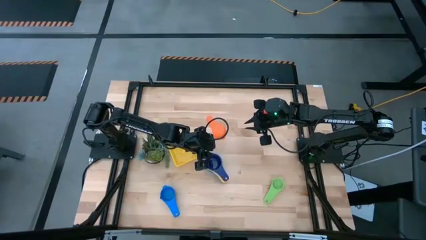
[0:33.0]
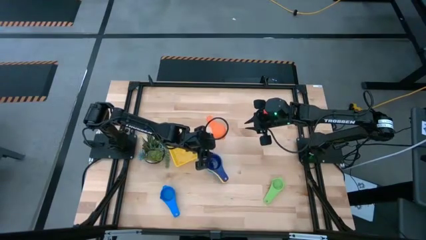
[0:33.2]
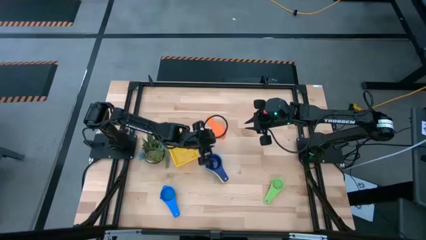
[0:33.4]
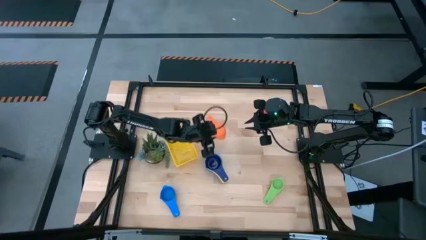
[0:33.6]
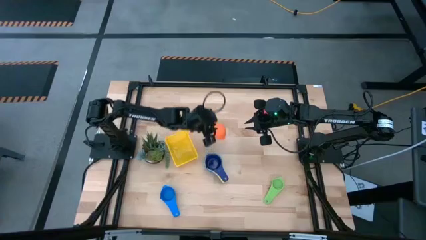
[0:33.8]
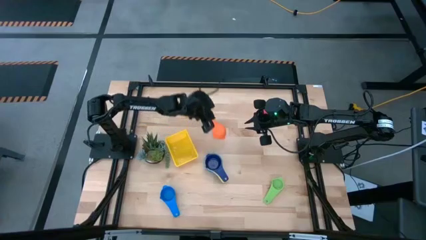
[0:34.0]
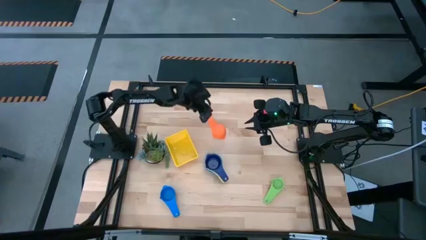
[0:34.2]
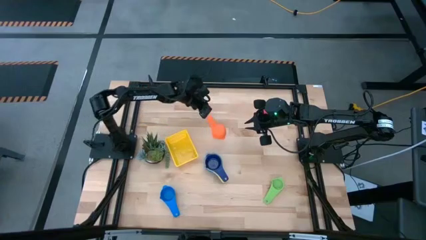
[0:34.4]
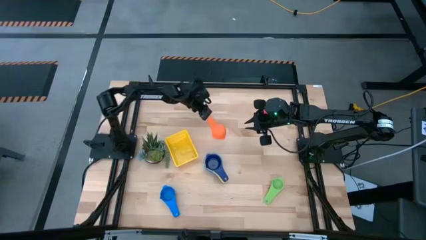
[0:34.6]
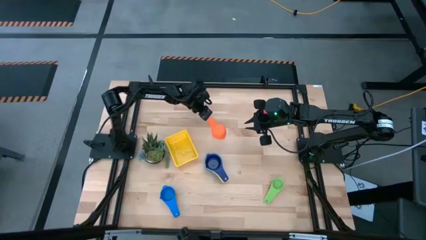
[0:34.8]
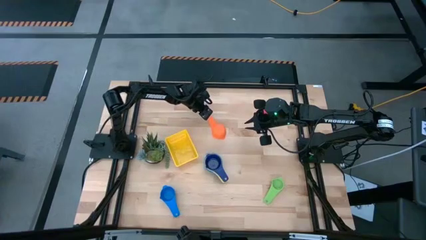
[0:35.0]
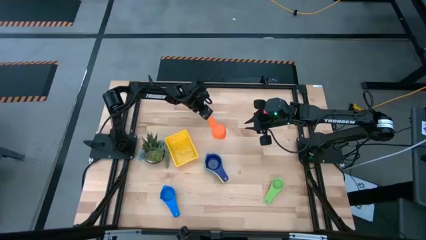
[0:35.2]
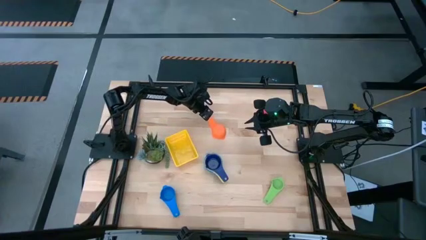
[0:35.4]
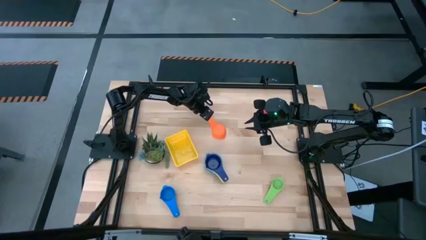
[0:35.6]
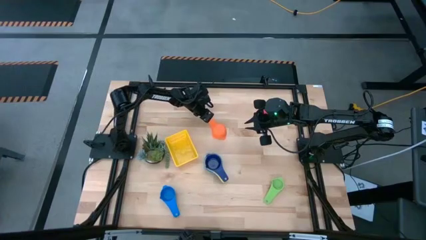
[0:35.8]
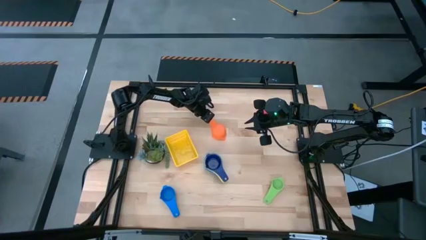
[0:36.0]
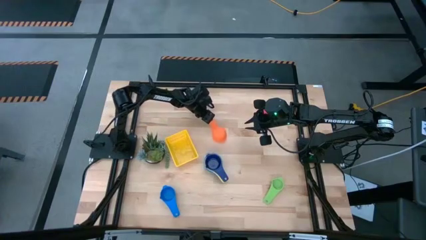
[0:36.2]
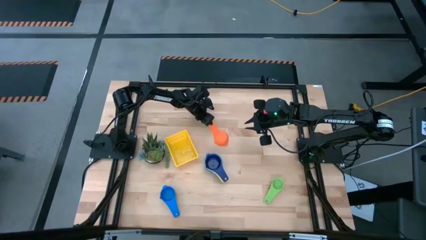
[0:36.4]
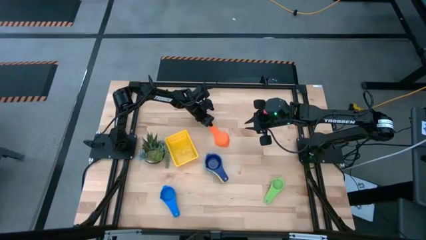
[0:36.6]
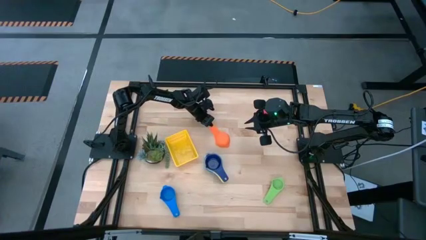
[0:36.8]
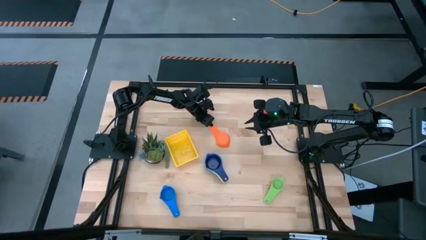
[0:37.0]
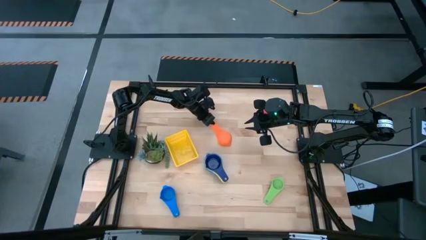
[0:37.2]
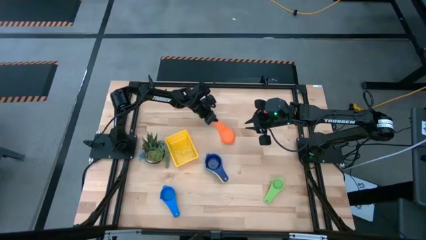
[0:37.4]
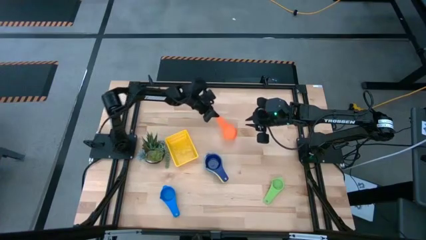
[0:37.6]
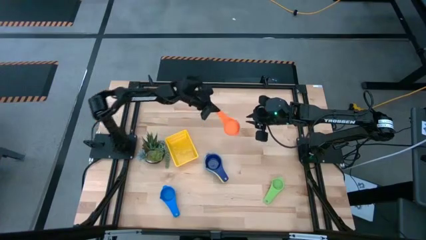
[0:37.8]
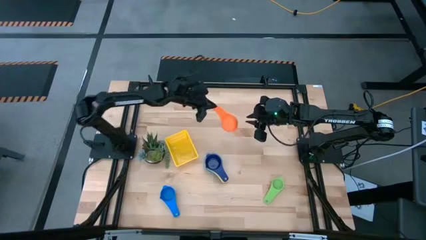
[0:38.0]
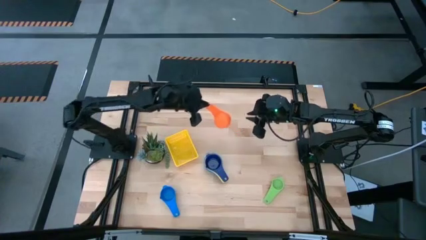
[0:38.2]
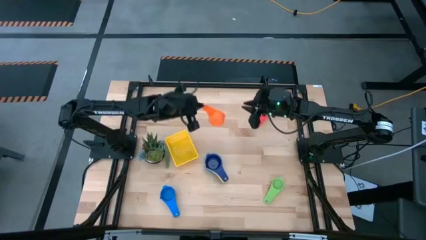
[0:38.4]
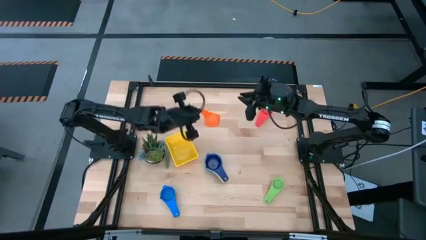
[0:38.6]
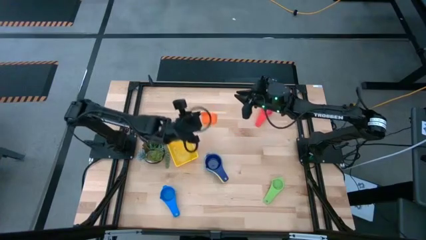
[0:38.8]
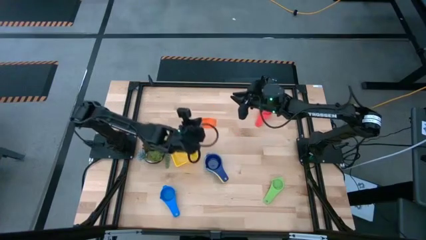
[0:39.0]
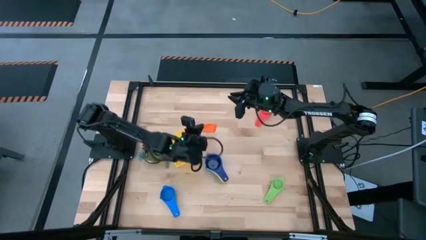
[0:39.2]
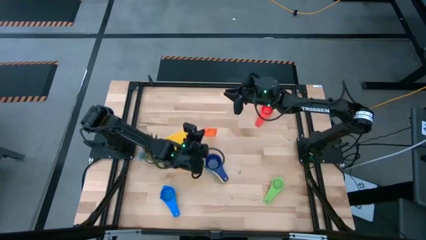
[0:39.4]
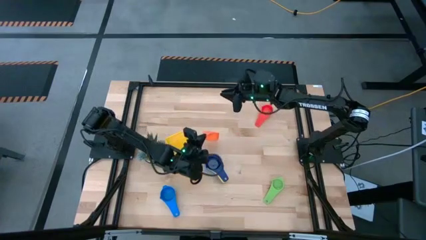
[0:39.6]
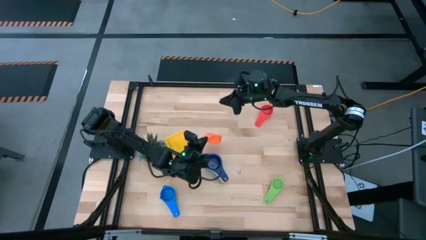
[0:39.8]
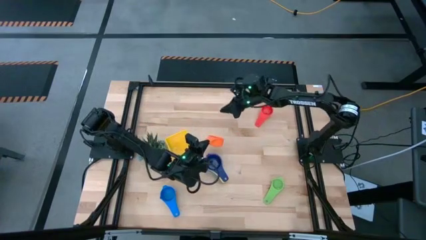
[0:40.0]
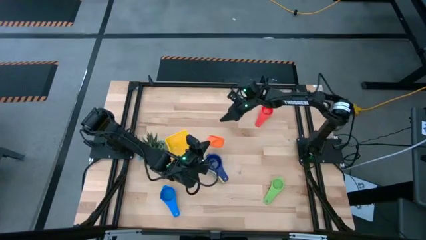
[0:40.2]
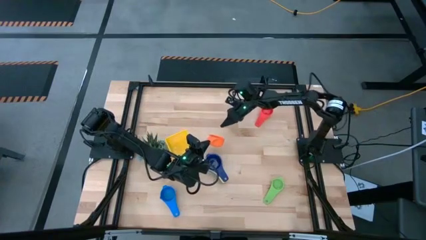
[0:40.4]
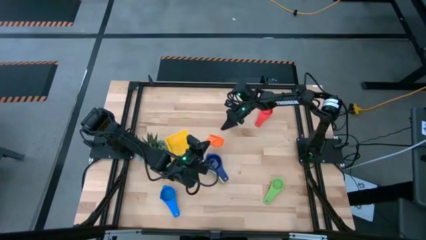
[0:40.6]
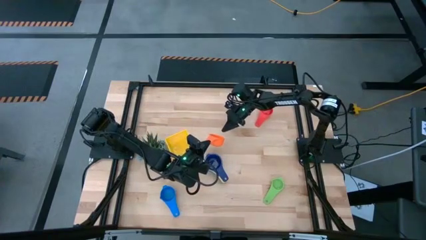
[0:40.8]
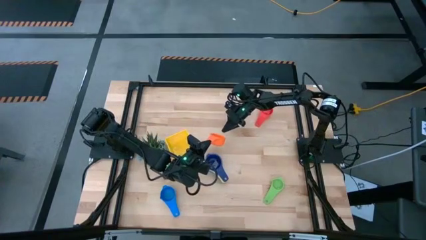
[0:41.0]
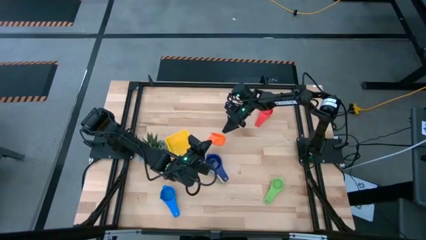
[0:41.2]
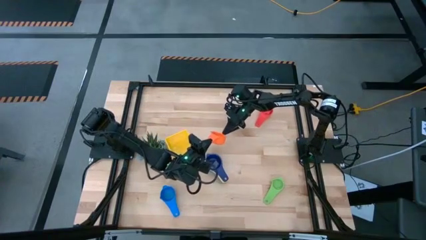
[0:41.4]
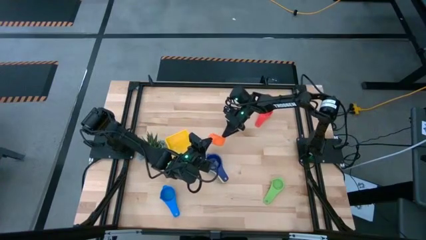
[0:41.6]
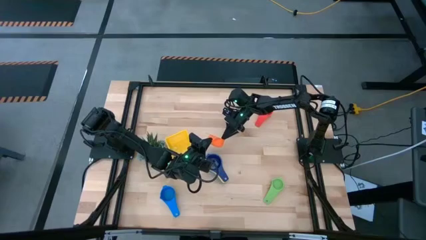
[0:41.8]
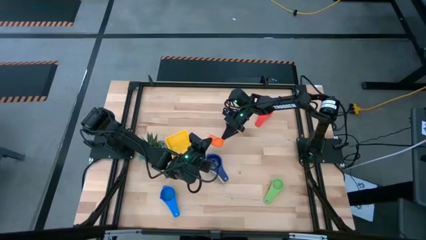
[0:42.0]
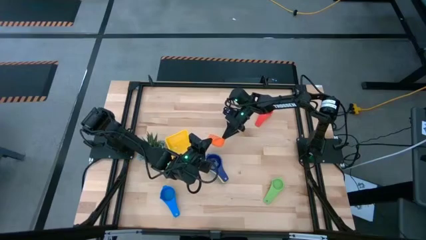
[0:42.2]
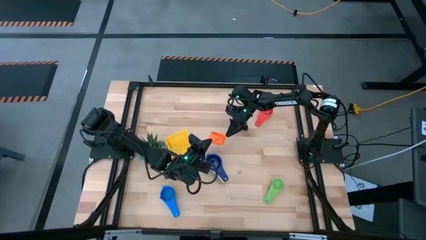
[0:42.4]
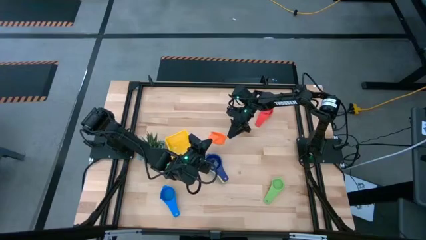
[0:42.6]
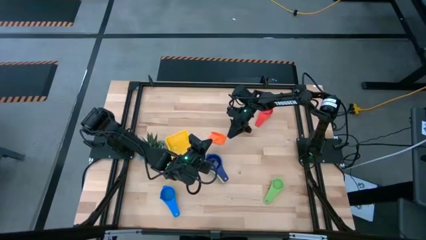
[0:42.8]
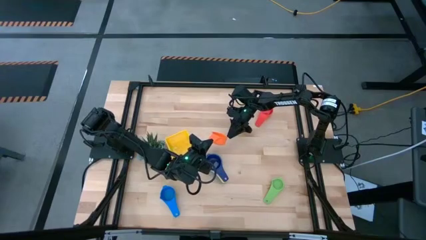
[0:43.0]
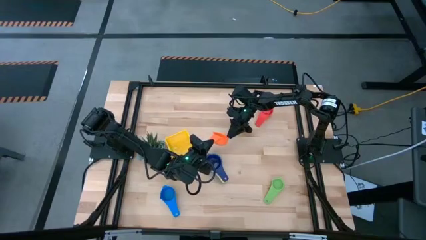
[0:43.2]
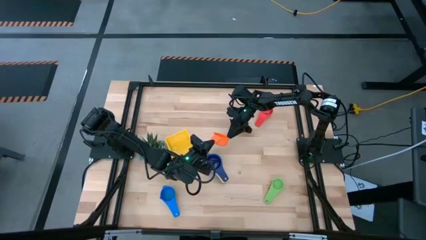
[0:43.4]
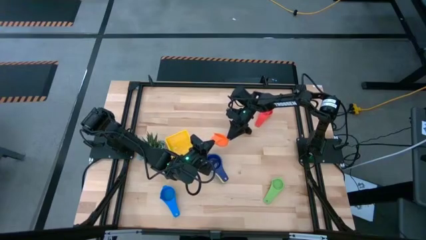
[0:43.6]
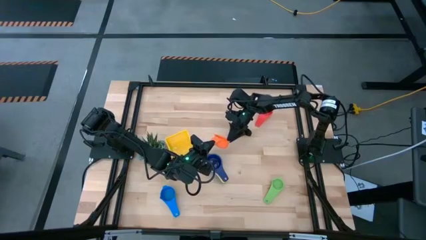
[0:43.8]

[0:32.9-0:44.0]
Task: Nest measuring cups in basket
Stack the orange measuring cup on top of the dark blue measuring cup

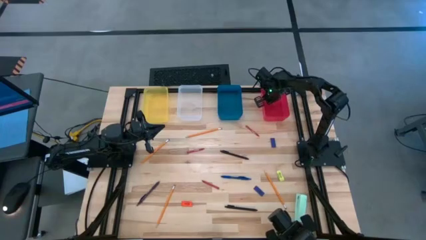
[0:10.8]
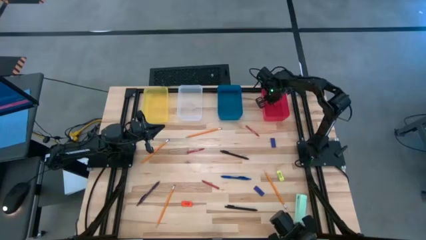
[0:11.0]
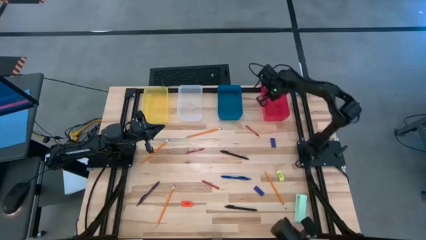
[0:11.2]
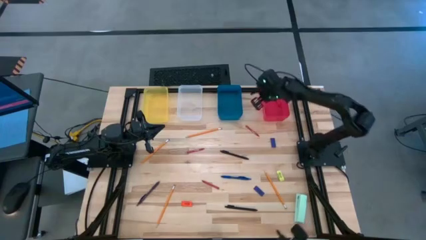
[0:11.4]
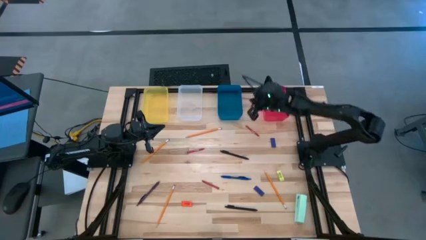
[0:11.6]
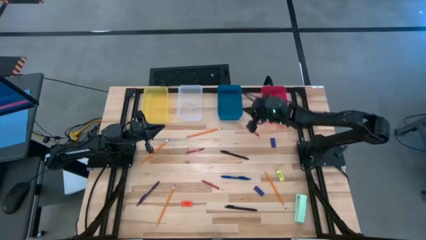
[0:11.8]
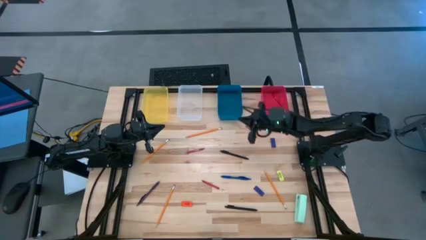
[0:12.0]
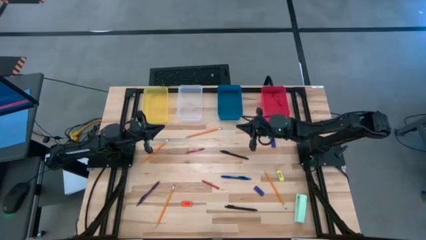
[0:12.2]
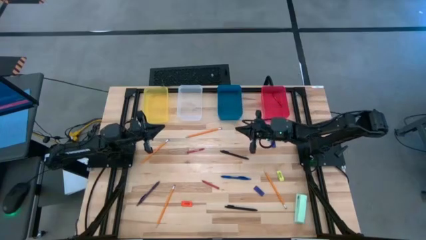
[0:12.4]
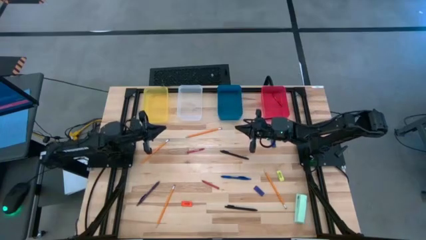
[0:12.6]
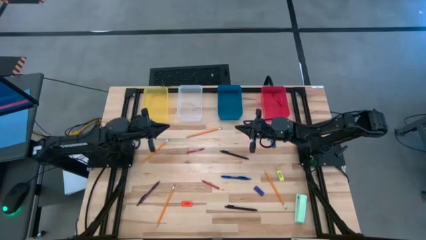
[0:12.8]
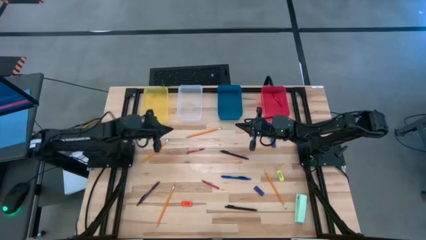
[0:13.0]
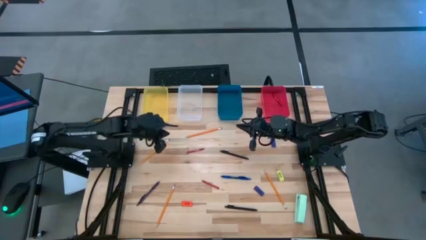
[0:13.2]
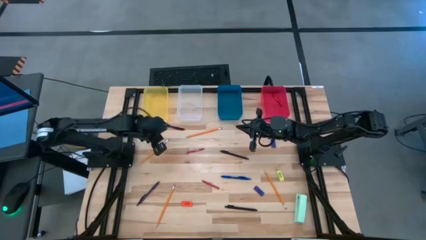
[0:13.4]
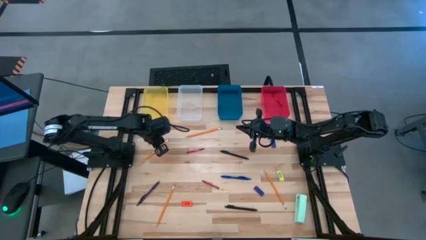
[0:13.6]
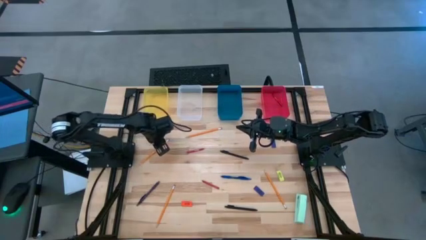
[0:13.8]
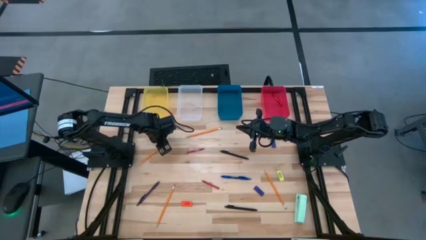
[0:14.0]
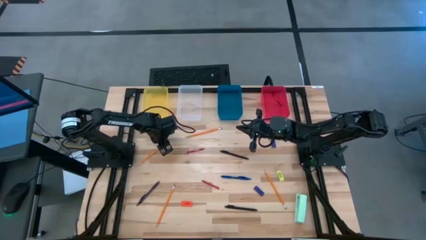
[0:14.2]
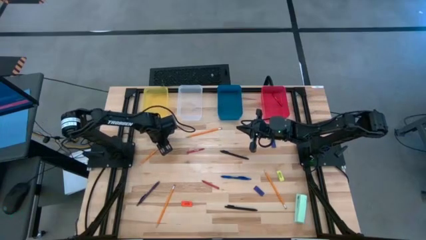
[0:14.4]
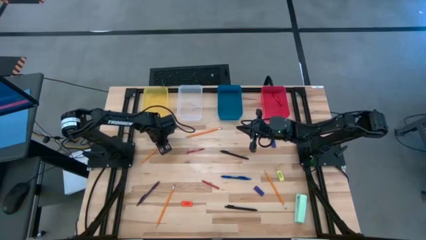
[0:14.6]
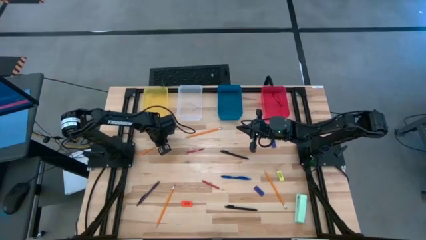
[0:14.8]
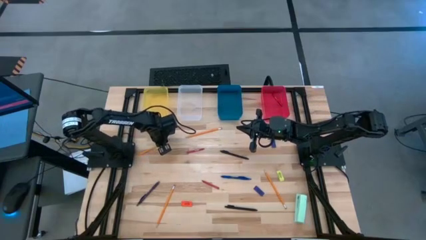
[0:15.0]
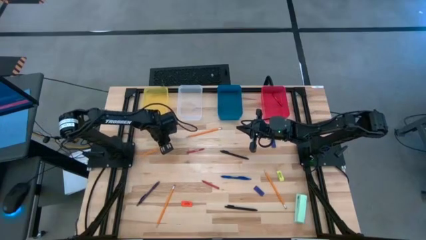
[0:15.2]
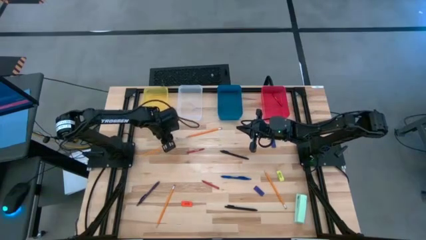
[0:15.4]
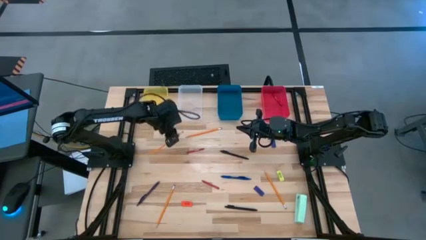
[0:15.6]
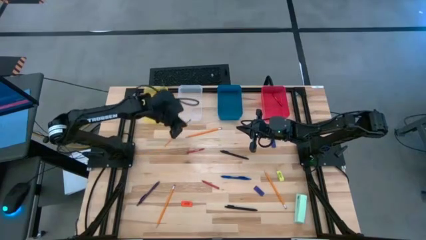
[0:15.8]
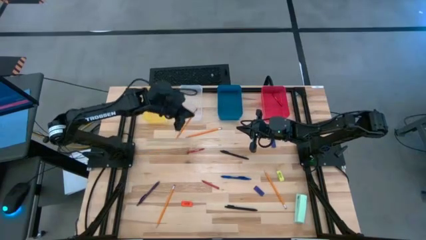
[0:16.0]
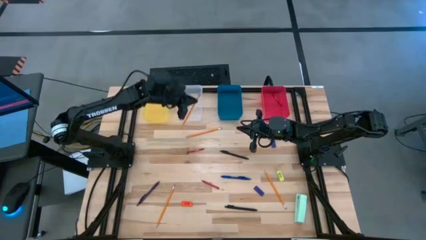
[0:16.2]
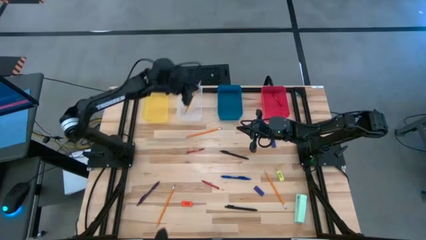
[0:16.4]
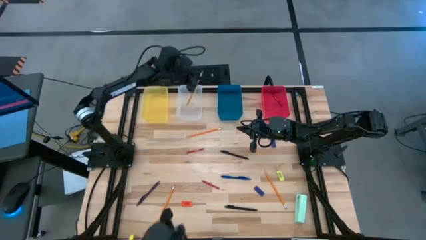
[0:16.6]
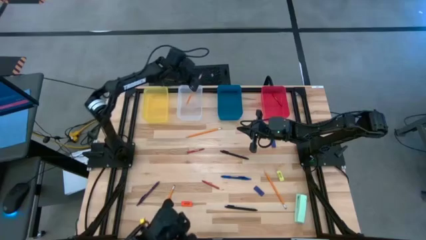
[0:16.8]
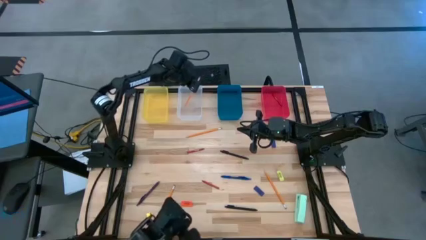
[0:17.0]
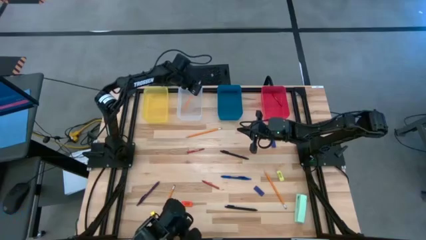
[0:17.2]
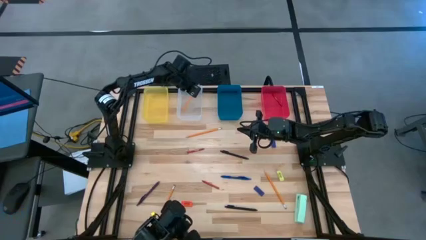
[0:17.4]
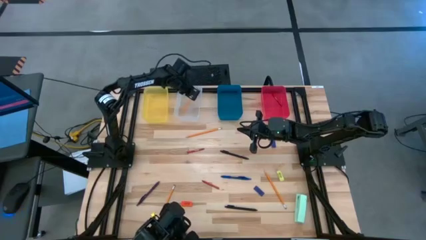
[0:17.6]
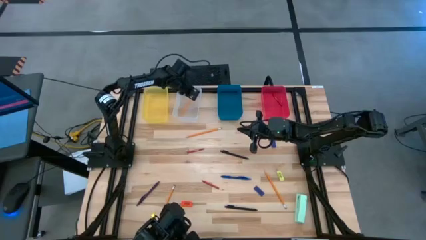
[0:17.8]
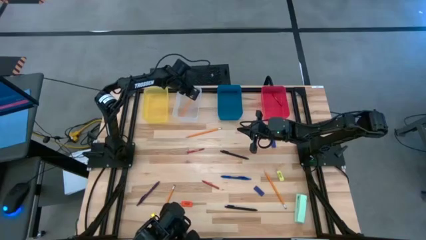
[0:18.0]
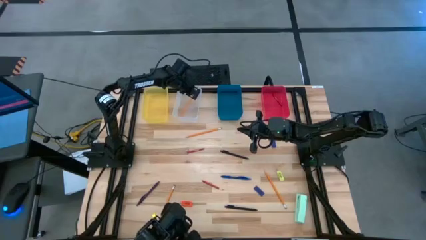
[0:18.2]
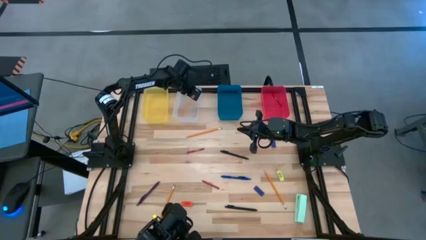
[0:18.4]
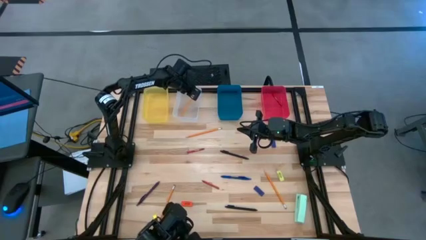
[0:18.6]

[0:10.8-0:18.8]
Task: Sort crayons/erasers/pens/pencils in bins
Put the orange pencil into the transparent bin
